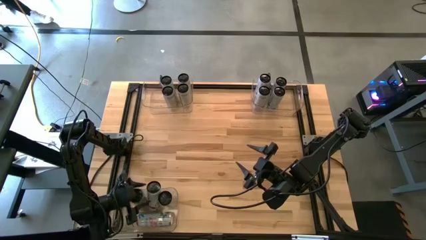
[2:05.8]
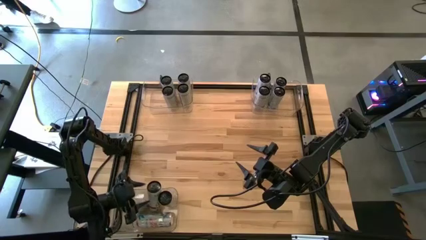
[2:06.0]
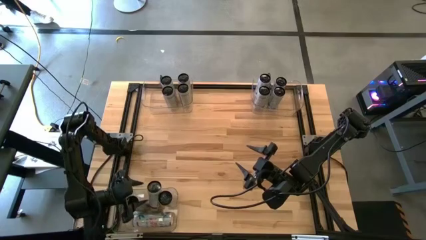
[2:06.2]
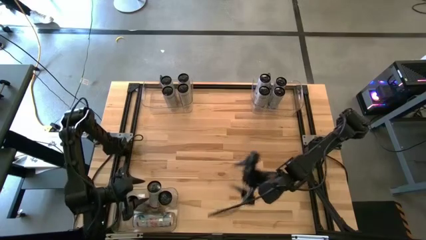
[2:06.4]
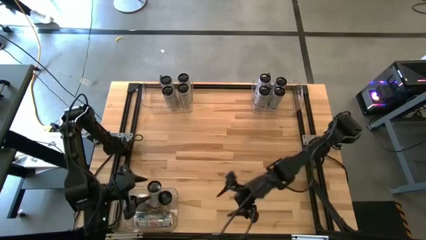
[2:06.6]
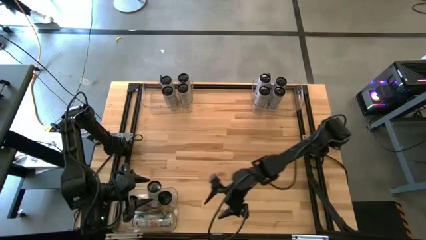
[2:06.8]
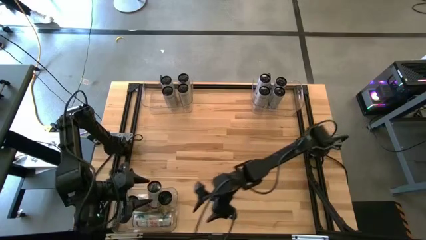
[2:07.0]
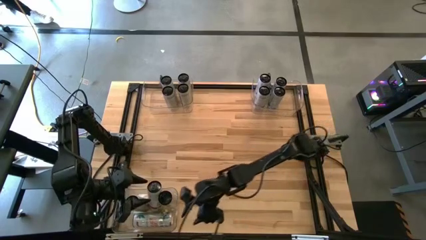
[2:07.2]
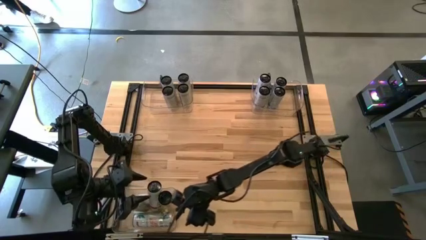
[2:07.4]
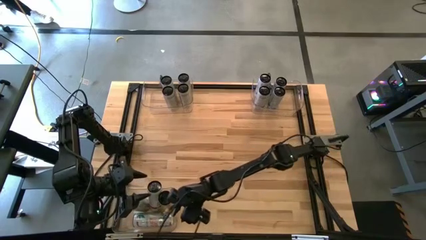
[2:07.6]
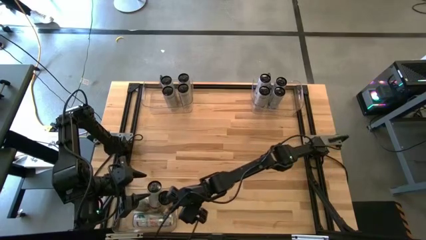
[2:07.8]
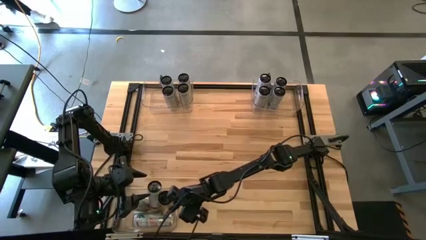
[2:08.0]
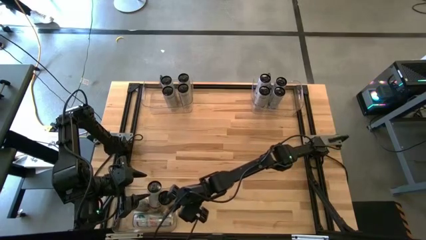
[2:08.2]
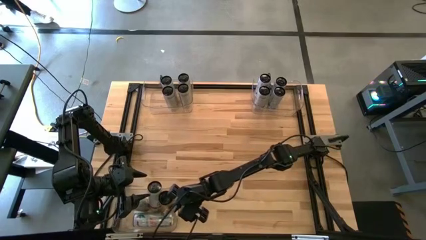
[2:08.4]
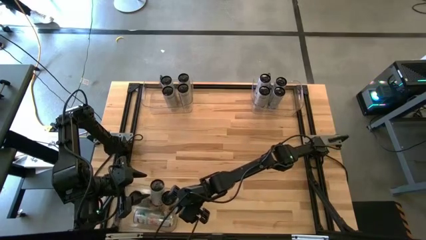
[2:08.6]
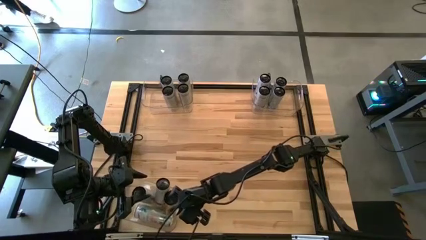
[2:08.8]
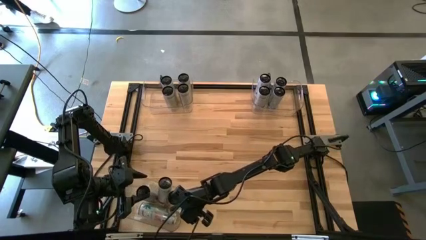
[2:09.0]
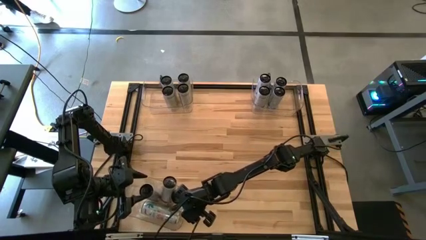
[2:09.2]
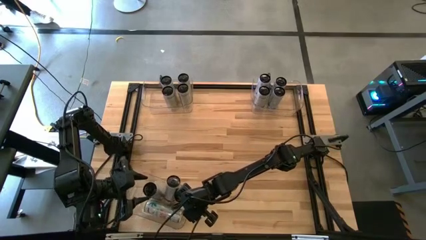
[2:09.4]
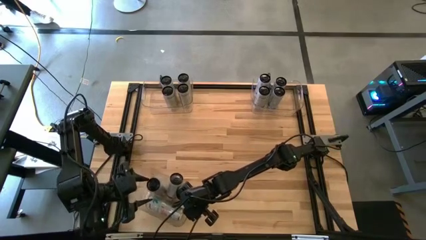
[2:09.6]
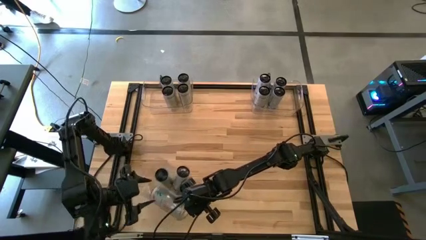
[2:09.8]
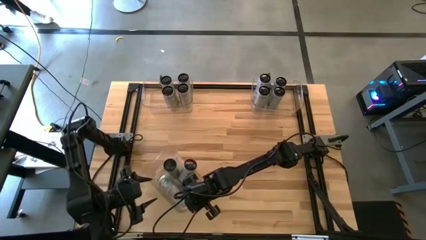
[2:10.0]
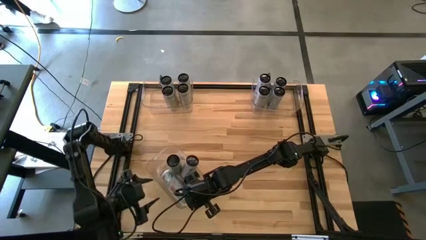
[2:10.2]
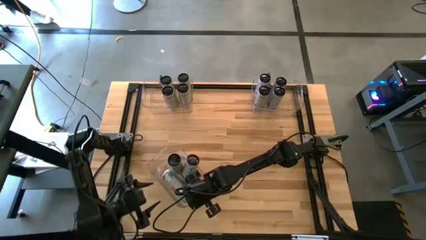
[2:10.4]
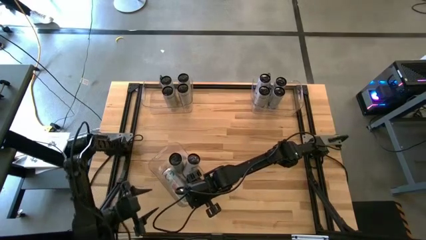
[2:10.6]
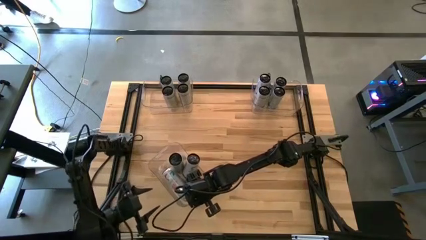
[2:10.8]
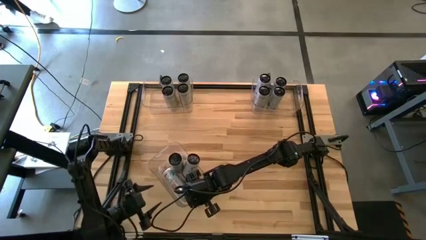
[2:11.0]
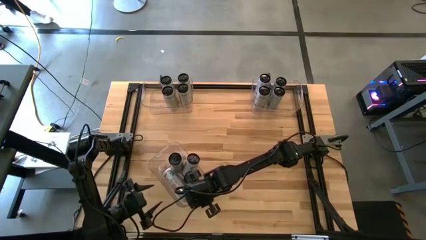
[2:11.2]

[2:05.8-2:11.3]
Task: Sort soda cans
Move the bottom left transparent bin to the center of the table

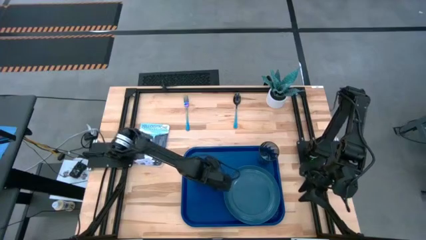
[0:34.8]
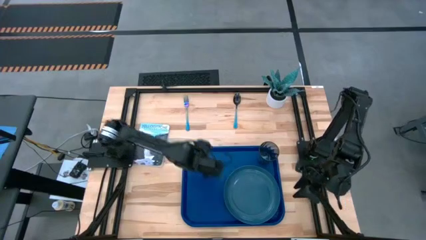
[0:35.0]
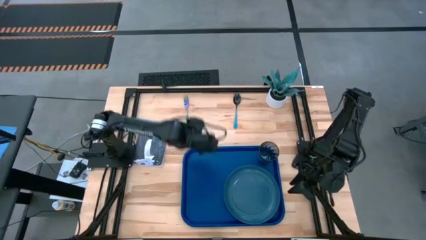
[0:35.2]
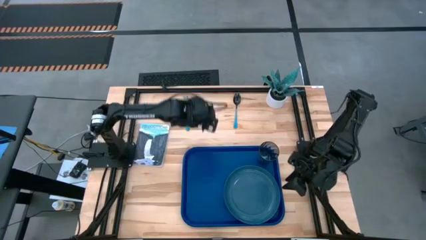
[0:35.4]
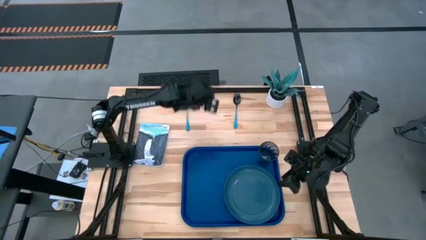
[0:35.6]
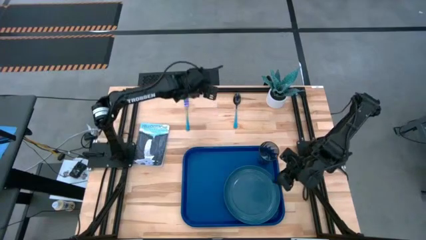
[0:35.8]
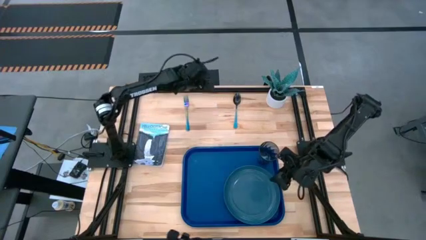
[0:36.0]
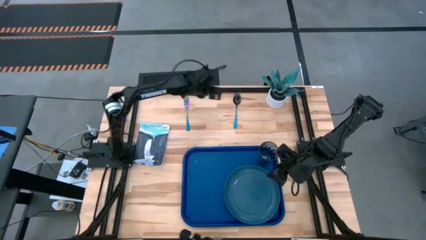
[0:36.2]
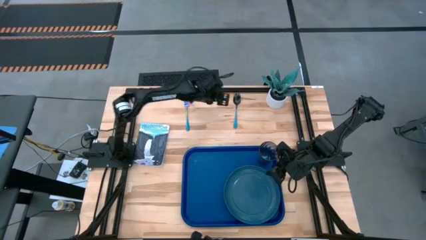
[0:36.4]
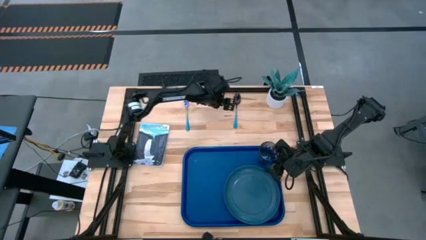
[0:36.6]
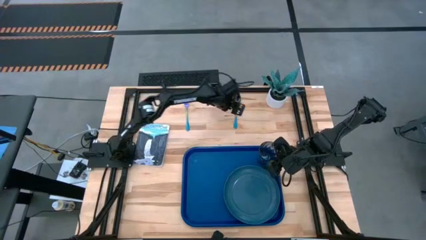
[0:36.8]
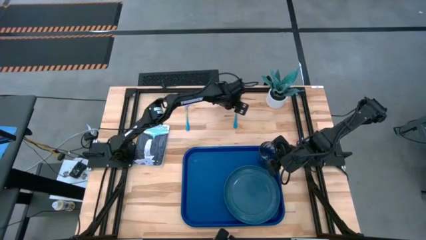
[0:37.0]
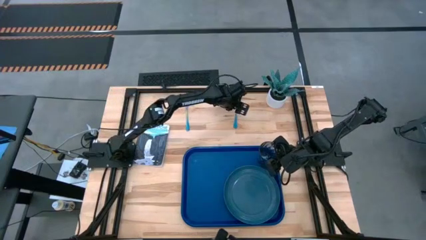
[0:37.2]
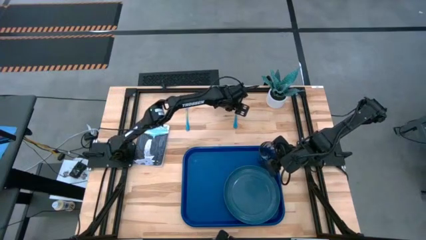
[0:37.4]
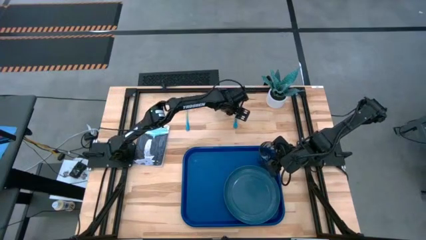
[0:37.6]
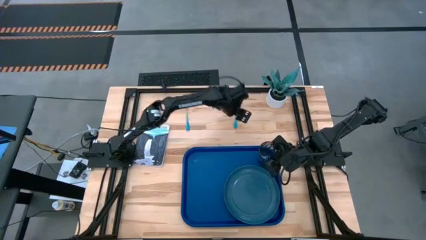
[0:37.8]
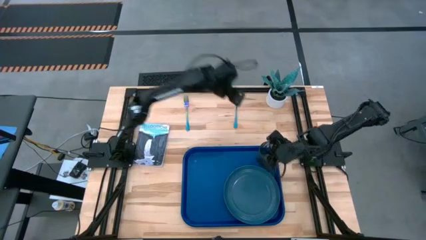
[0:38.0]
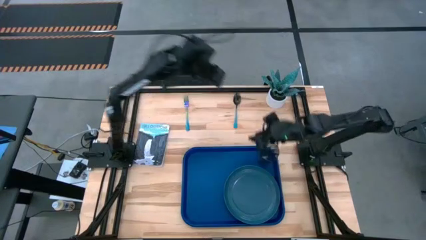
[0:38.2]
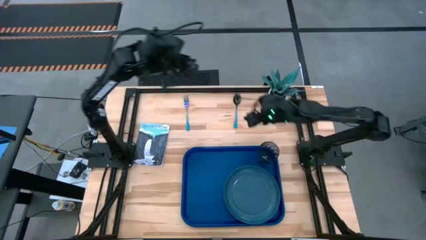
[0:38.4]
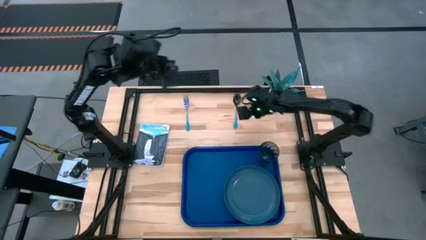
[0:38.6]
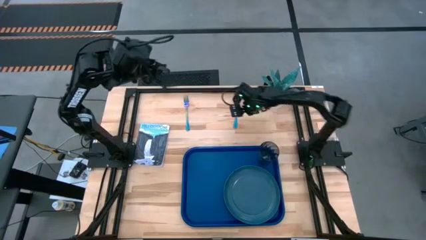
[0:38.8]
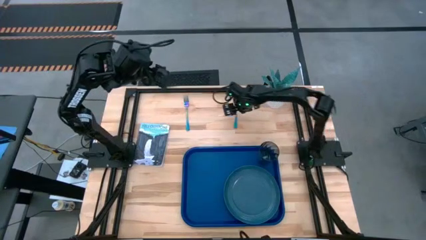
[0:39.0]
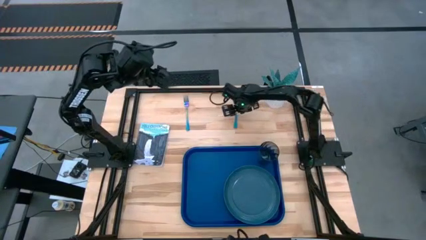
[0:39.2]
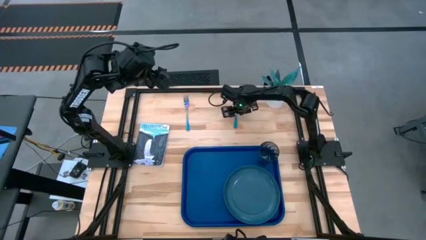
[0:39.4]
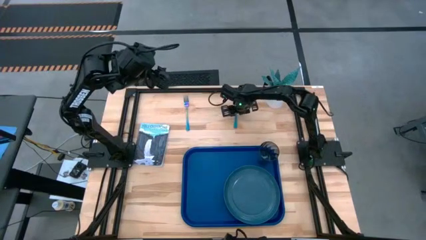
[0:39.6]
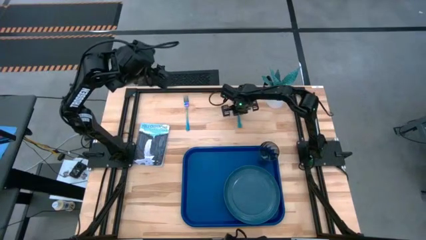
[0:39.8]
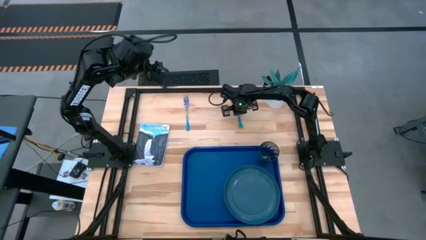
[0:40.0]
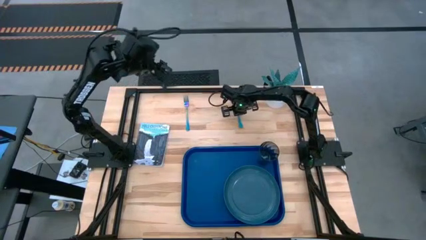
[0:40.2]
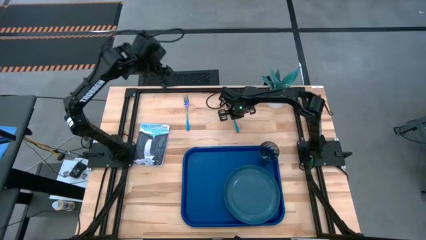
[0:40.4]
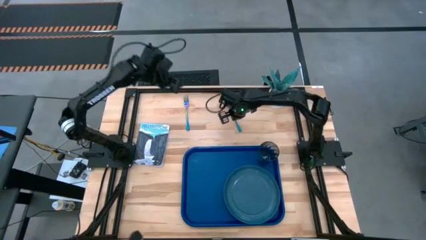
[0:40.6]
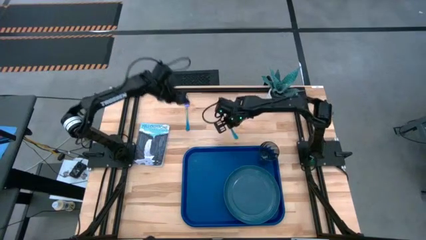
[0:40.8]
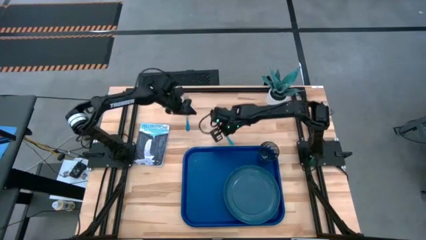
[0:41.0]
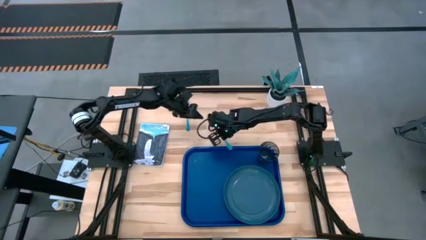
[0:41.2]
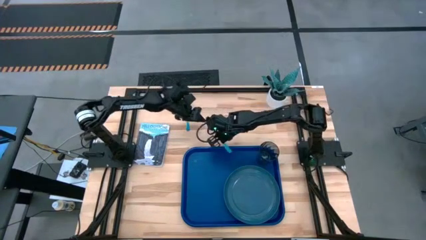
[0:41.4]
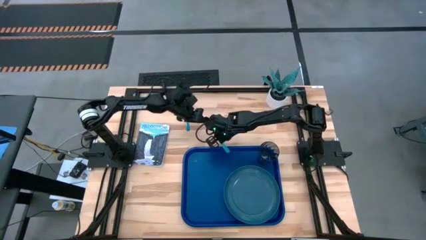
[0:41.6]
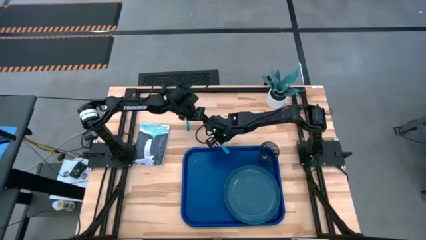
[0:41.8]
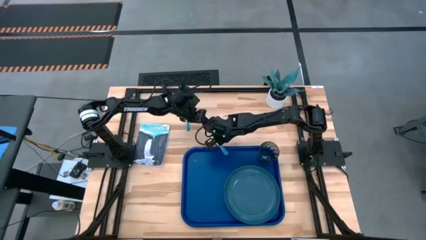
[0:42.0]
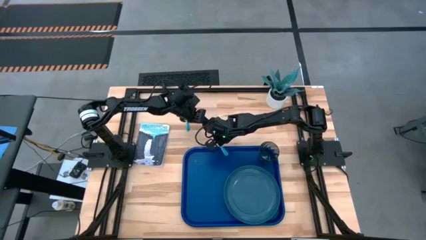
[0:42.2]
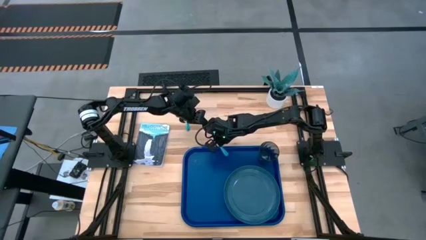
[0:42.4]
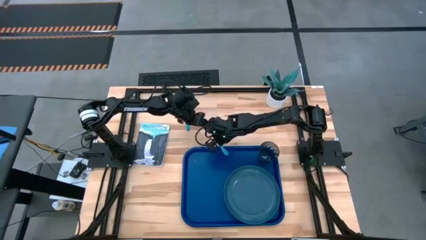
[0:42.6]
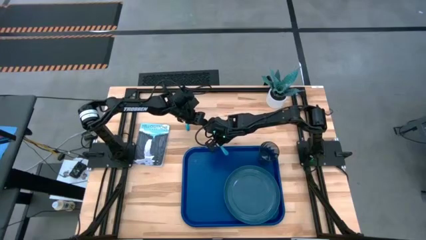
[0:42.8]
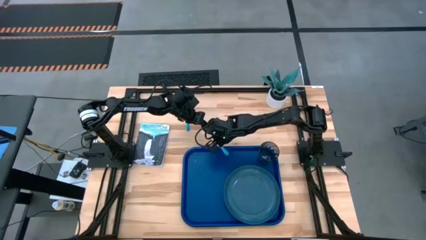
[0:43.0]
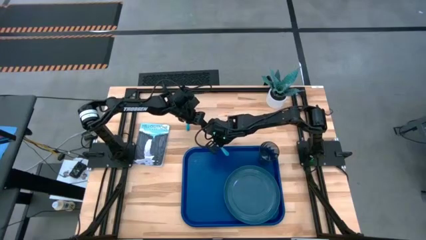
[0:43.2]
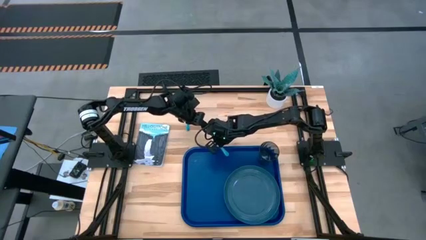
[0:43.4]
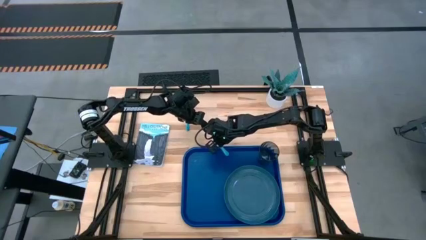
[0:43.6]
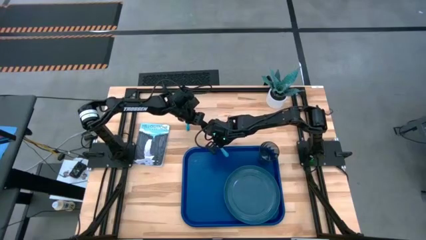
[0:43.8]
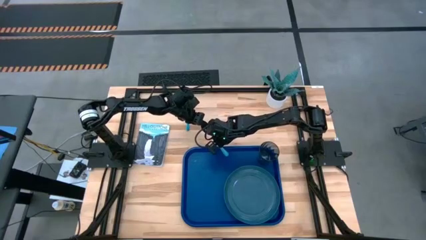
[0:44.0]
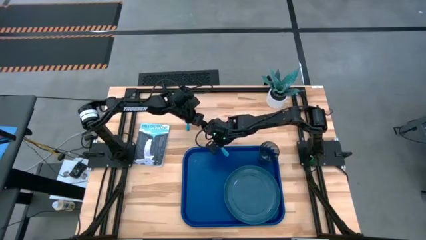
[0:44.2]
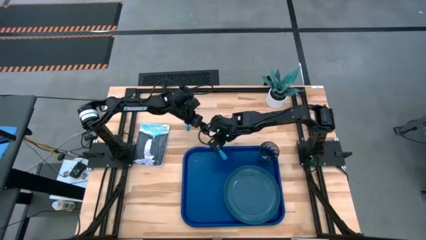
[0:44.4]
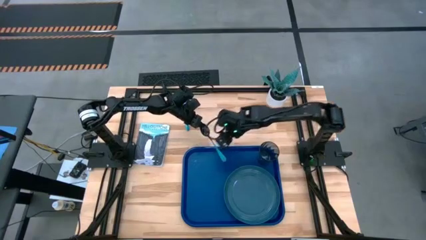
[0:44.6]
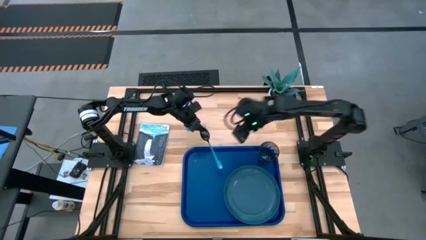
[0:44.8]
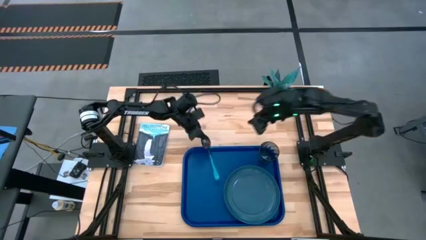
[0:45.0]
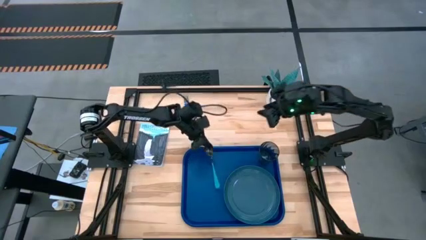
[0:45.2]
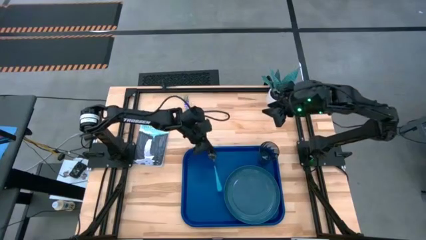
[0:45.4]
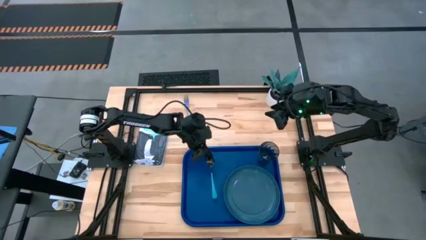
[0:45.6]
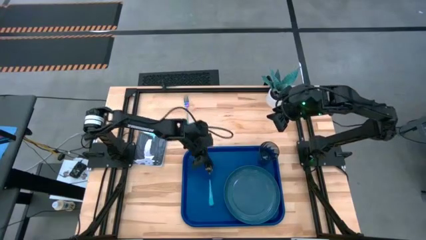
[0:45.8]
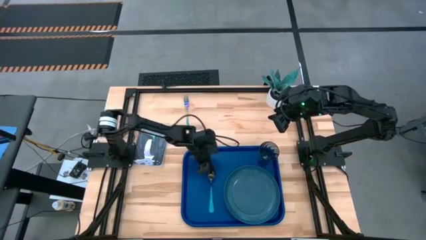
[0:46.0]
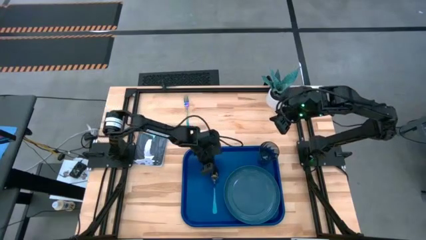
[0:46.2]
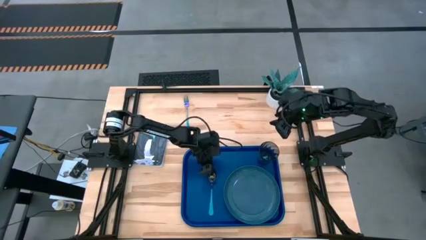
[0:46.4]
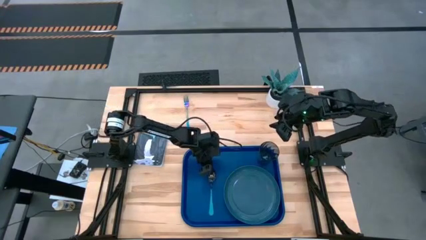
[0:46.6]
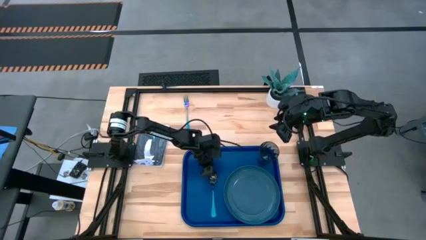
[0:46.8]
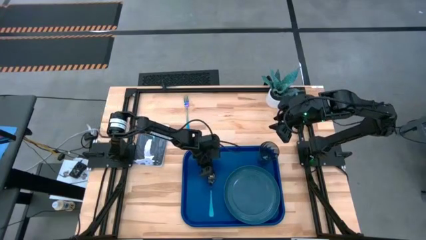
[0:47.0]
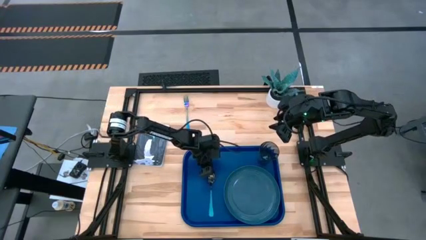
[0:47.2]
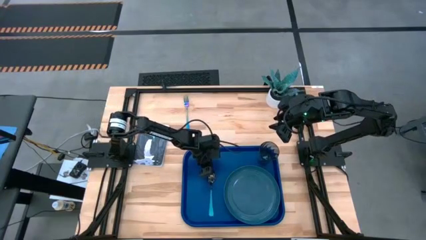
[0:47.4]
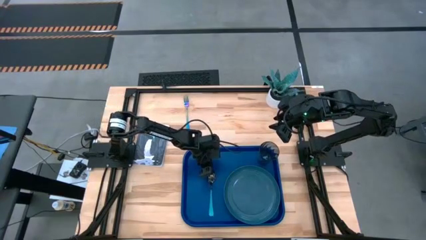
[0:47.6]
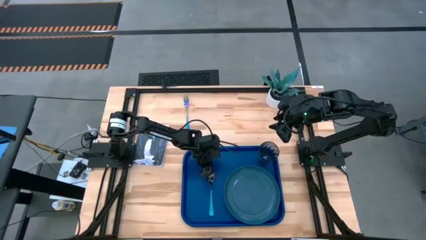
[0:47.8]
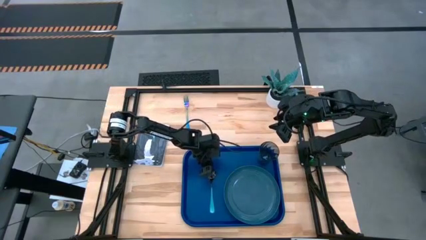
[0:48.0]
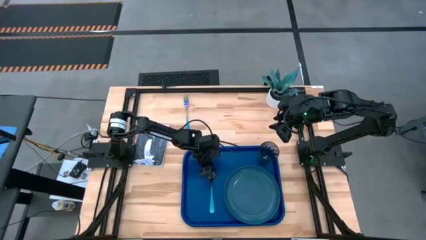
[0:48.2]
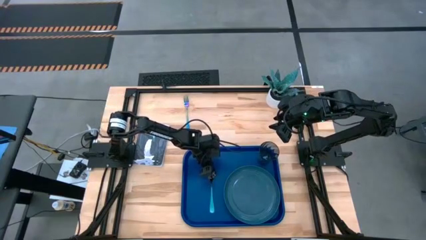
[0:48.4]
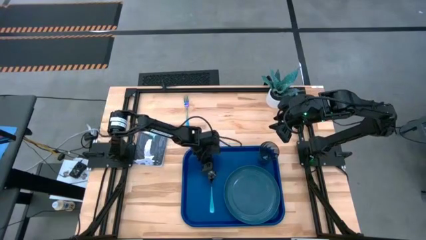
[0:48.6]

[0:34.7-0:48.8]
Task: Pick and place plate/cup/fork/spoon on tray
Put the blue spoon beside the blue plate on the blue tray
